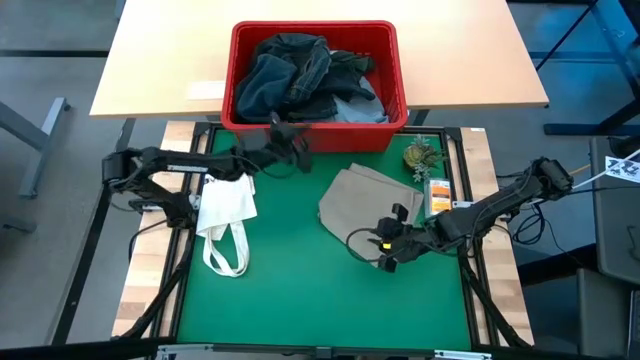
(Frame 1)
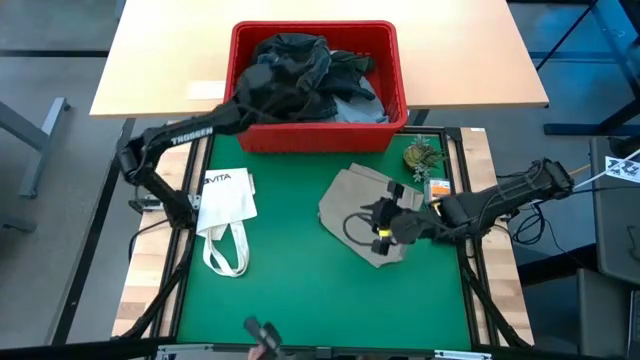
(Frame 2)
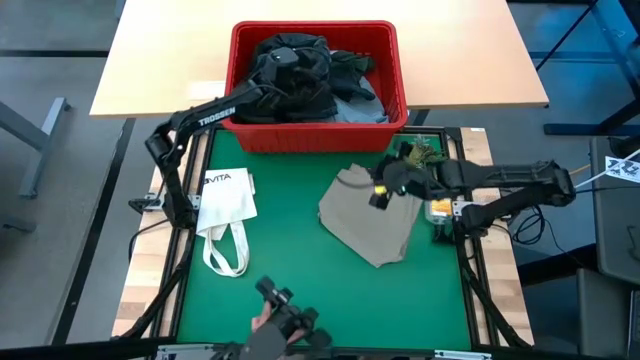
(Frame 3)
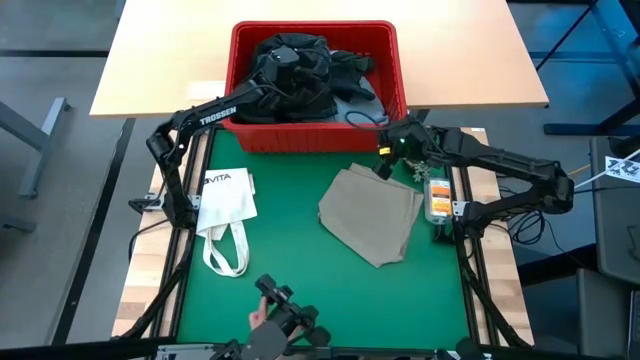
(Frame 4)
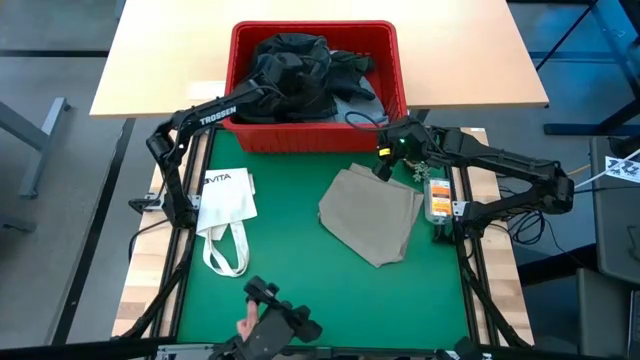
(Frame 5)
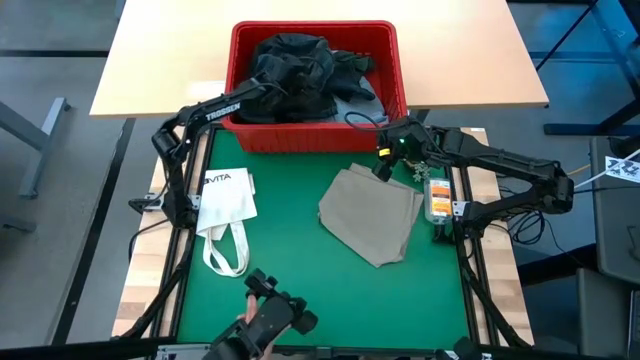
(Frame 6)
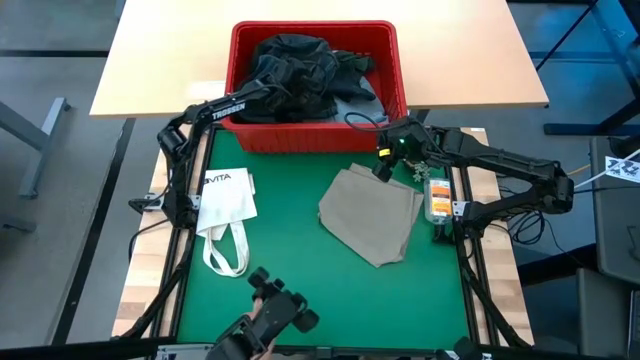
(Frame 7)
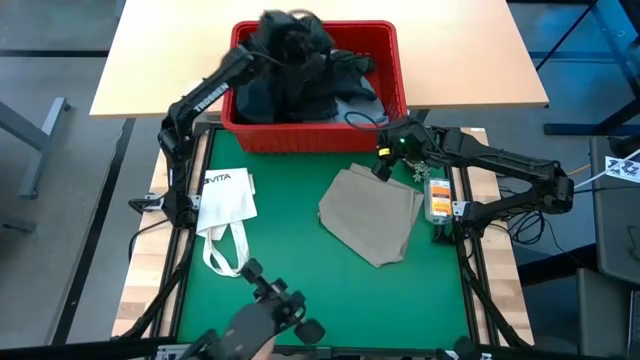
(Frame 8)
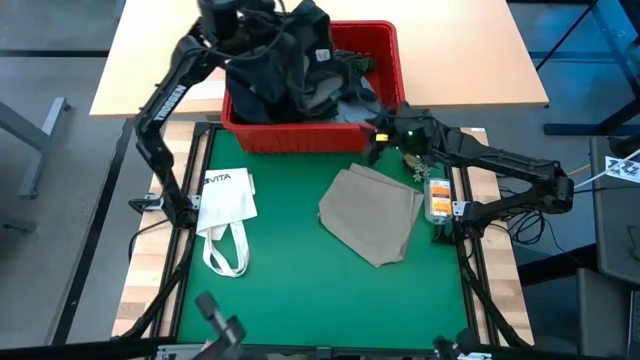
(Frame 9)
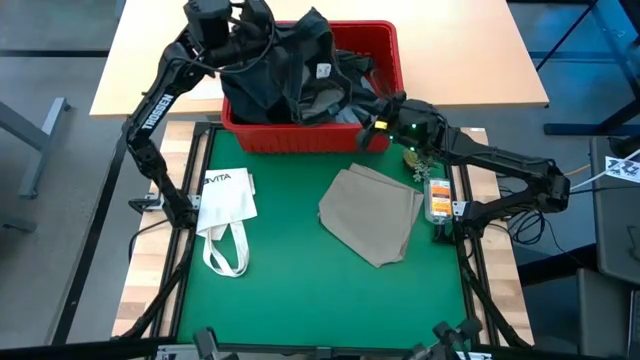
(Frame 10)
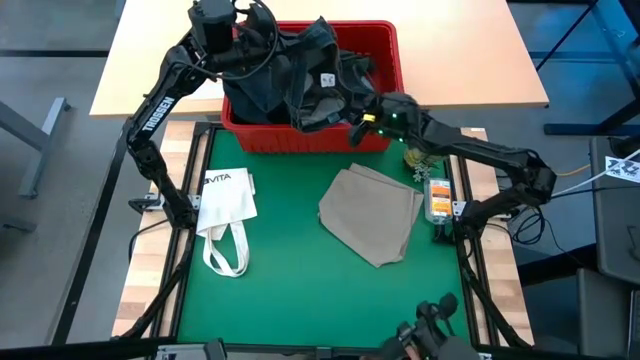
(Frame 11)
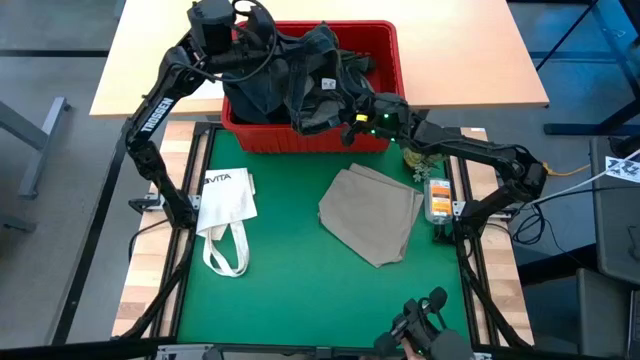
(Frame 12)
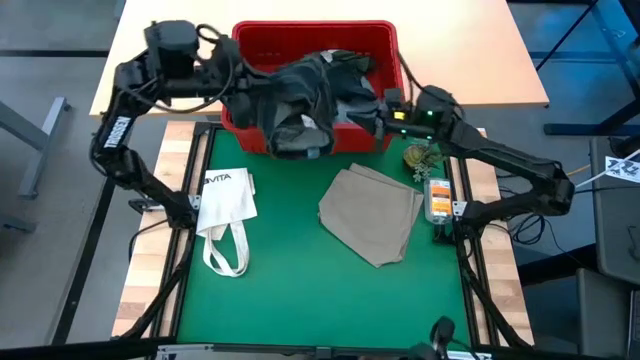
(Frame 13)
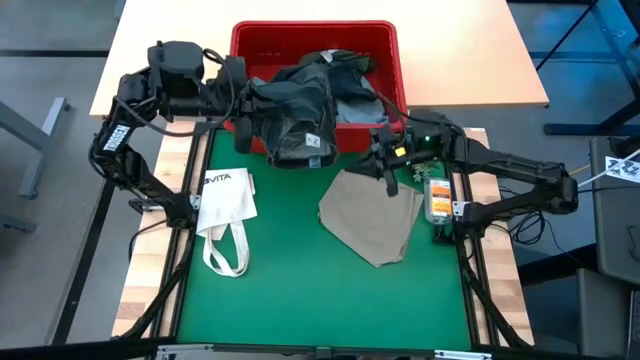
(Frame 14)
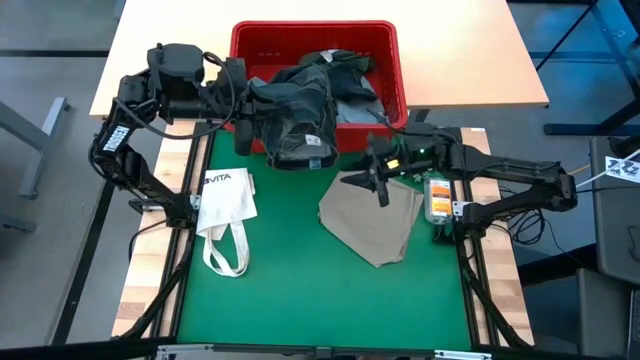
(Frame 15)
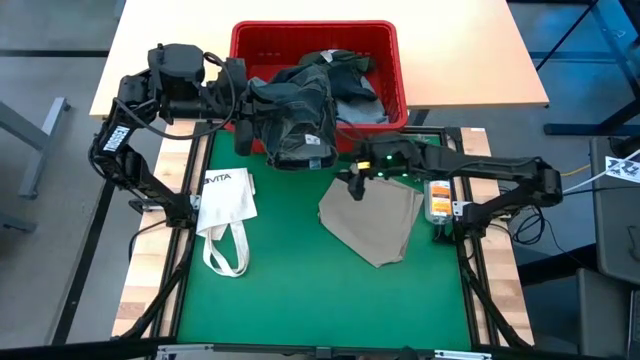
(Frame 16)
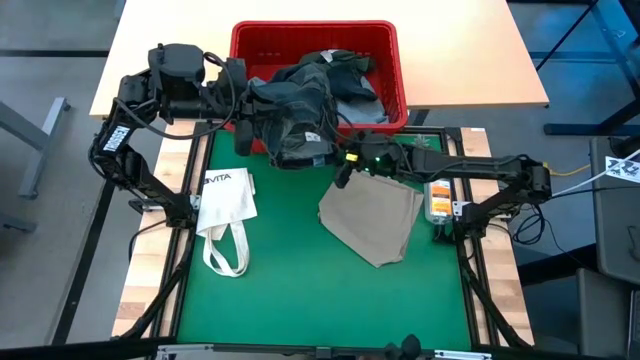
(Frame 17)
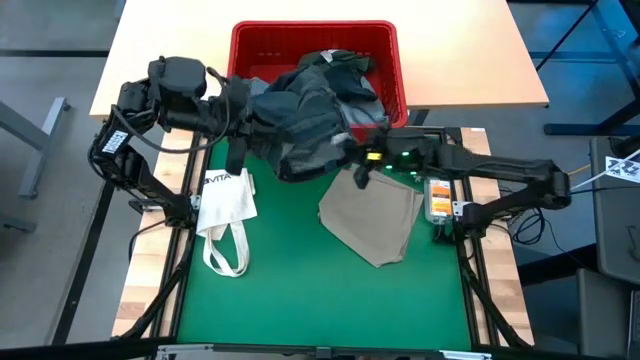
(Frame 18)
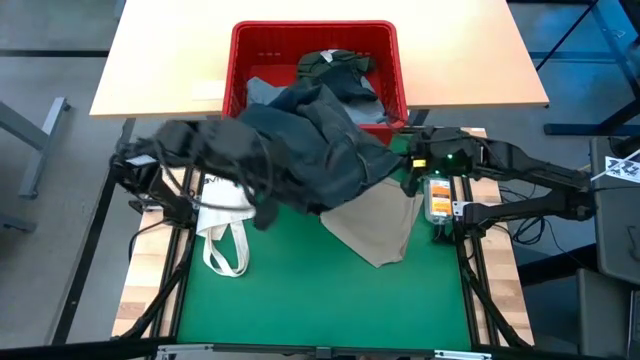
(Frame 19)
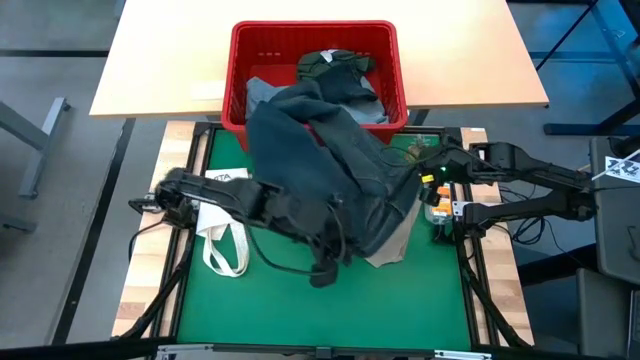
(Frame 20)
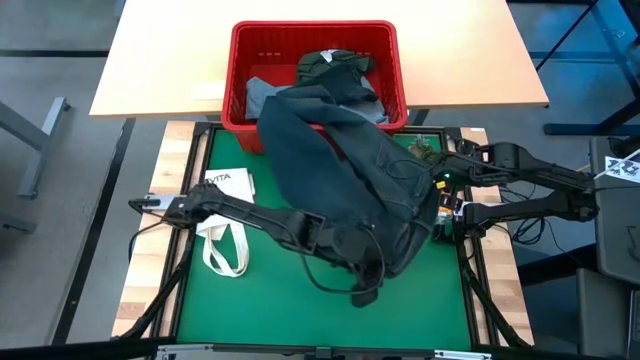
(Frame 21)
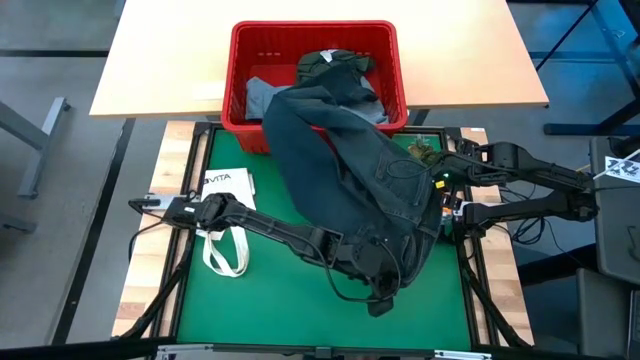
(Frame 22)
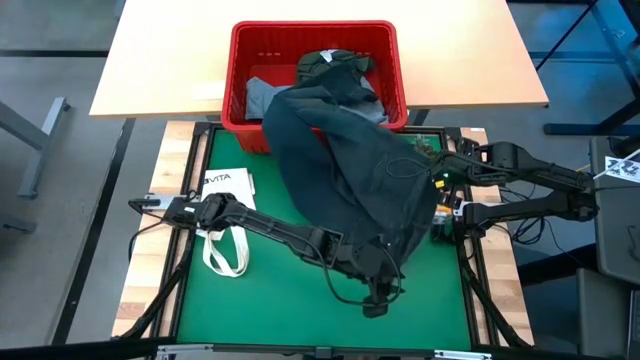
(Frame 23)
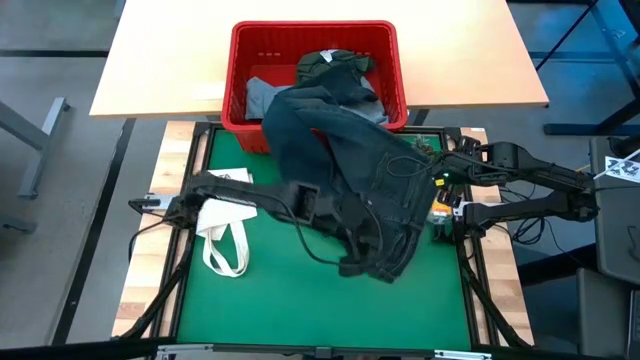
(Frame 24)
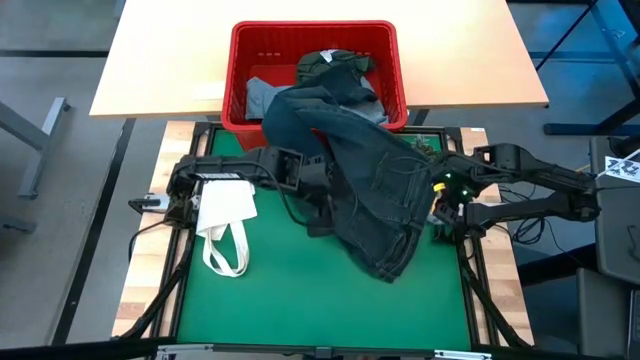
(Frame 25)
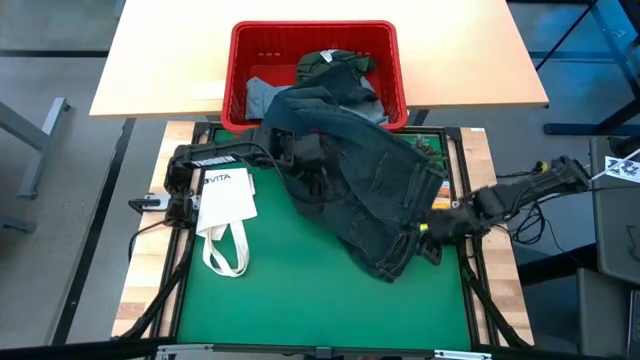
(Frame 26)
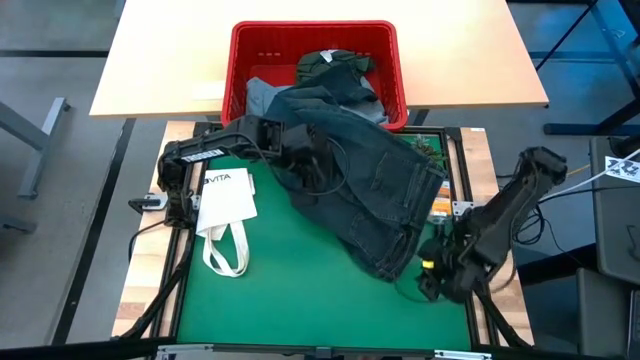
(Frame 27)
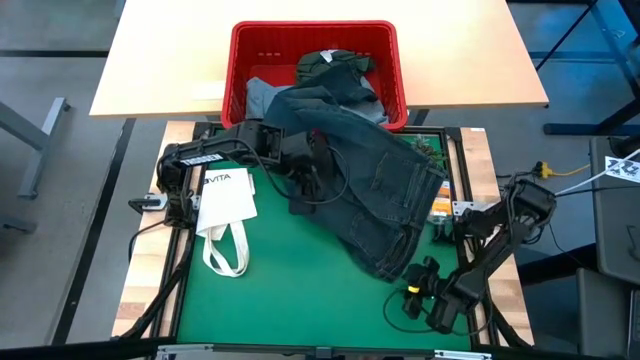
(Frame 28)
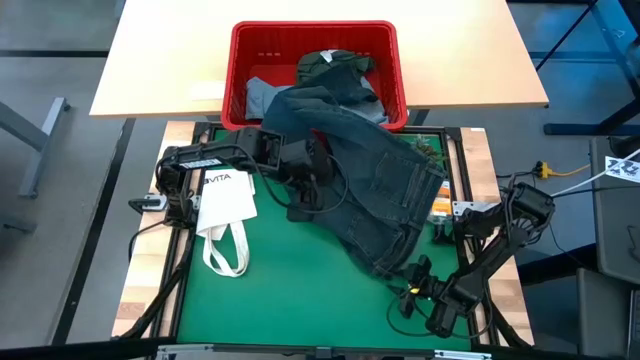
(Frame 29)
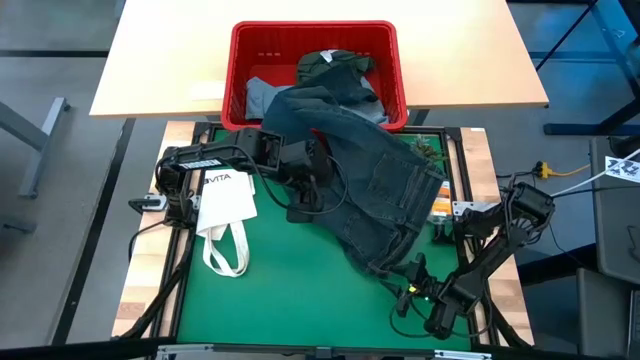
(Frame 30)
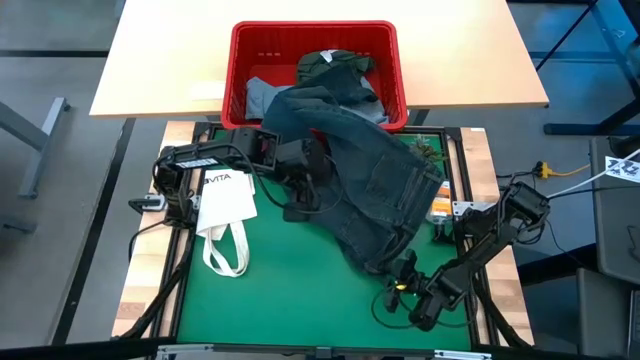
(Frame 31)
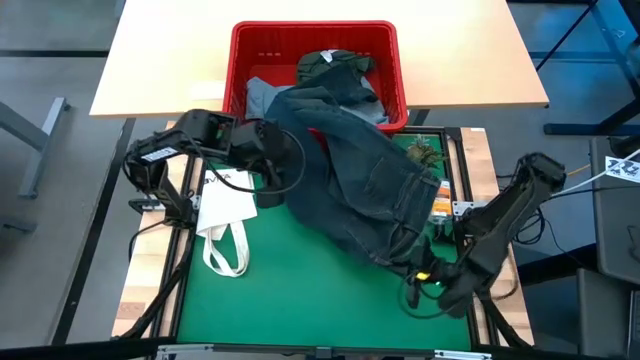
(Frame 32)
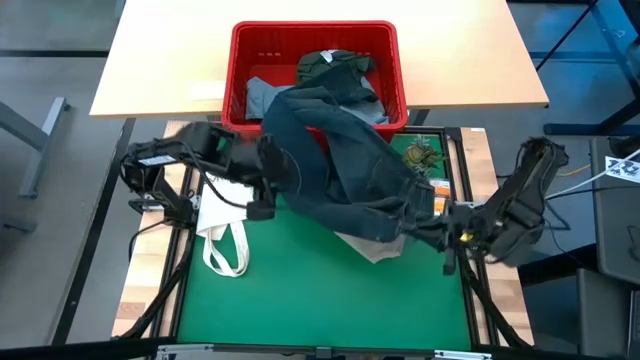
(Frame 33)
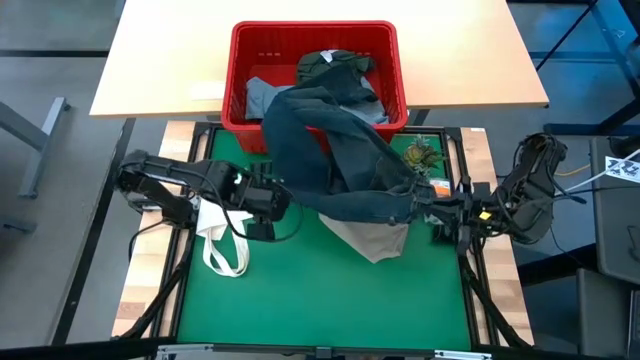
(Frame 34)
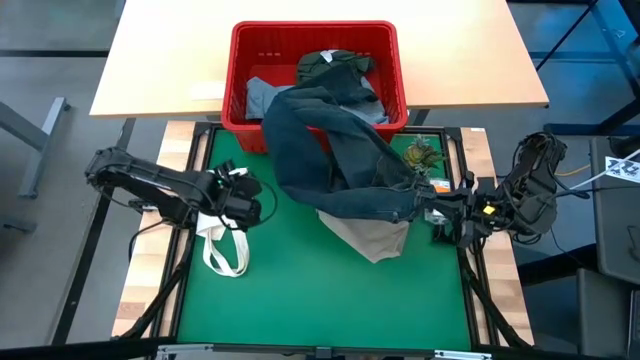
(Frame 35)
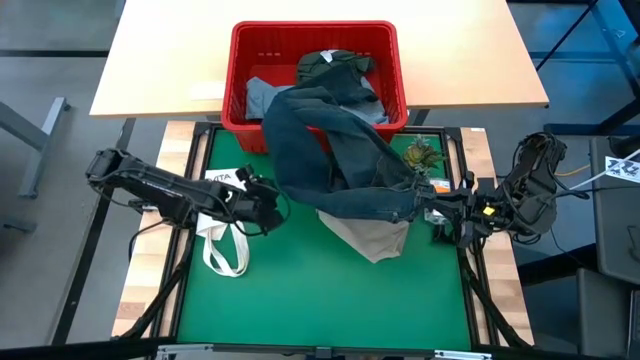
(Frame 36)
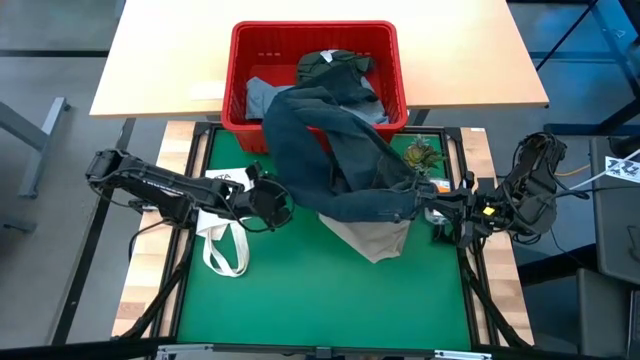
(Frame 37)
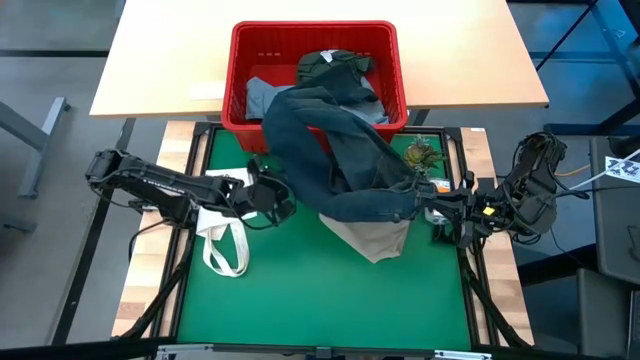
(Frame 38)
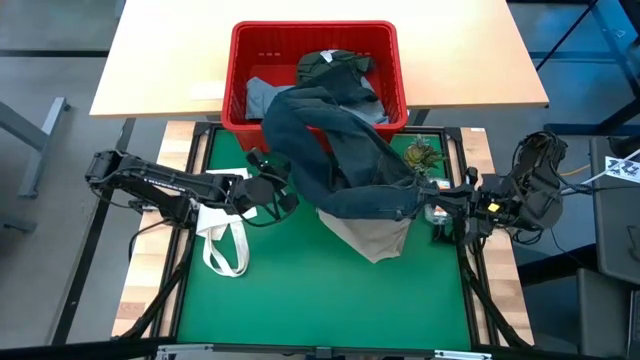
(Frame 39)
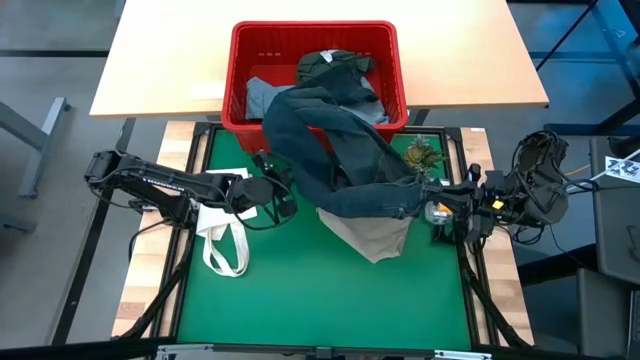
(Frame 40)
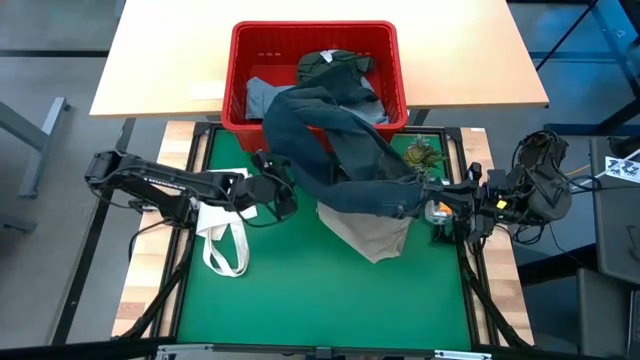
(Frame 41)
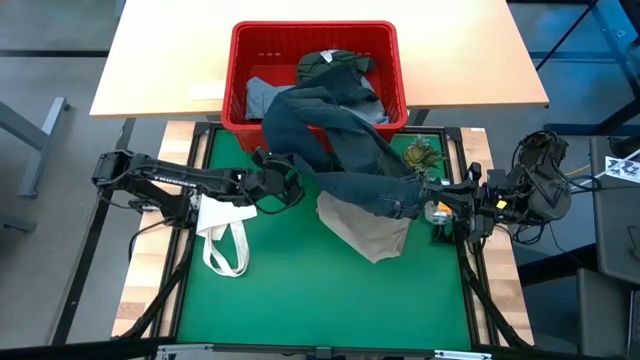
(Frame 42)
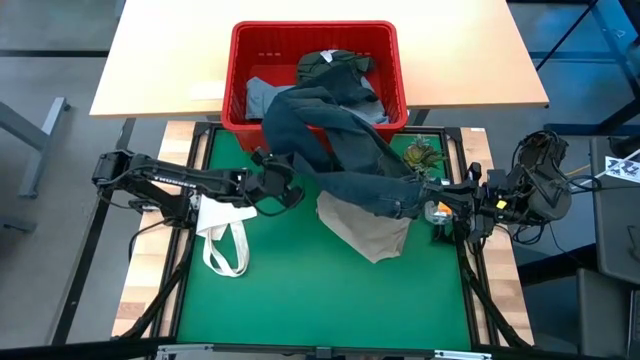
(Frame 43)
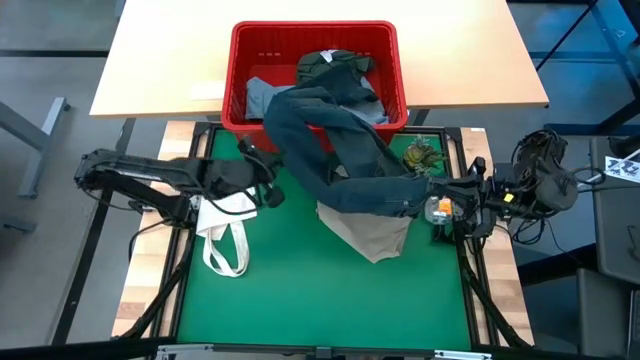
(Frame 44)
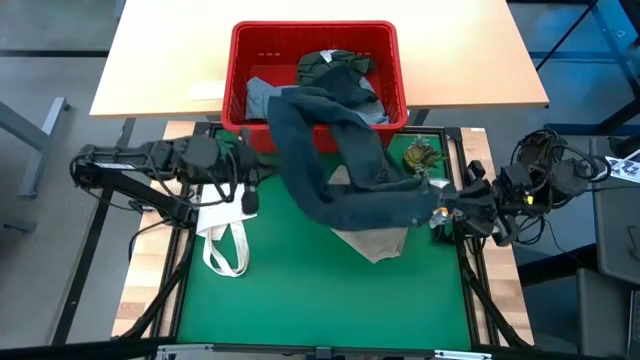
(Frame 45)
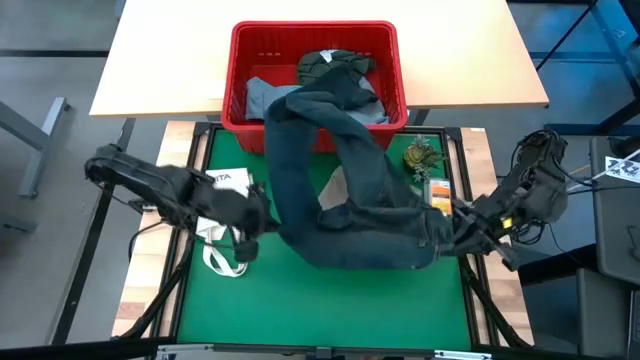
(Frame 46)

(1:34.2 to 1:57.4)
Task: Fold Laundry from Bin
Fold the dark blue jeans
